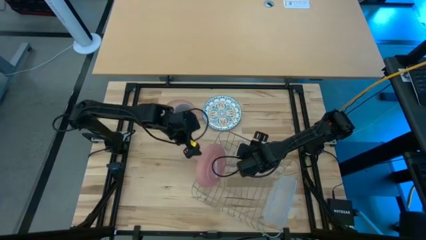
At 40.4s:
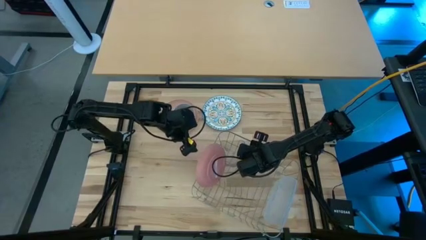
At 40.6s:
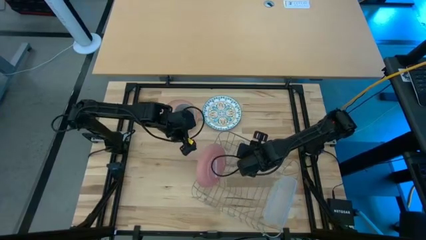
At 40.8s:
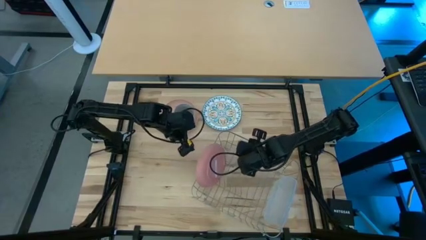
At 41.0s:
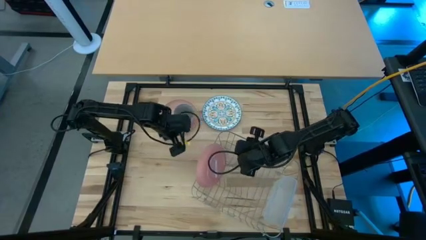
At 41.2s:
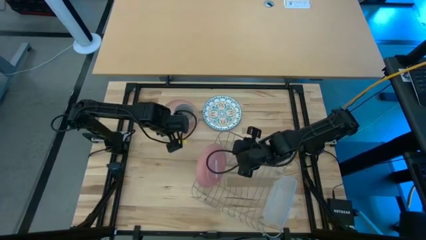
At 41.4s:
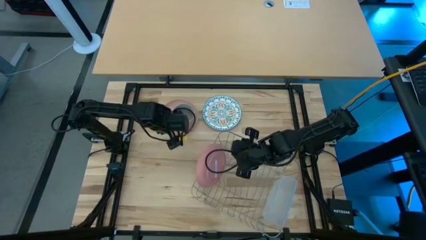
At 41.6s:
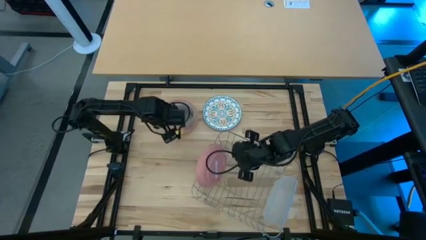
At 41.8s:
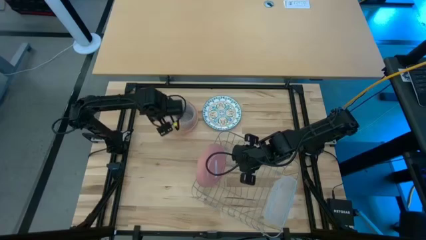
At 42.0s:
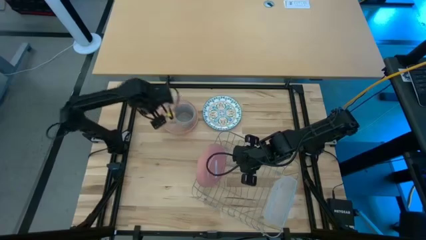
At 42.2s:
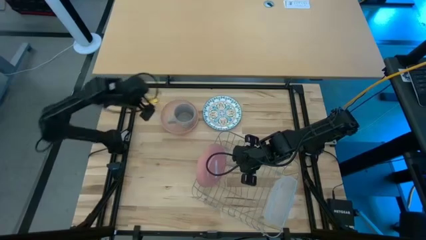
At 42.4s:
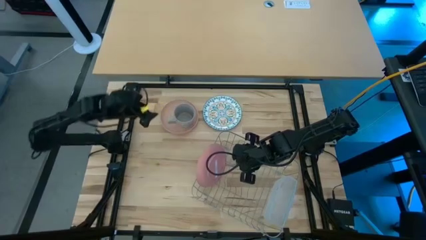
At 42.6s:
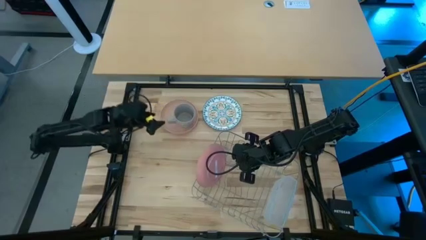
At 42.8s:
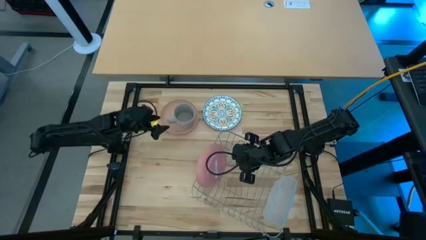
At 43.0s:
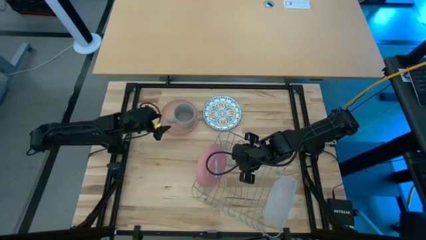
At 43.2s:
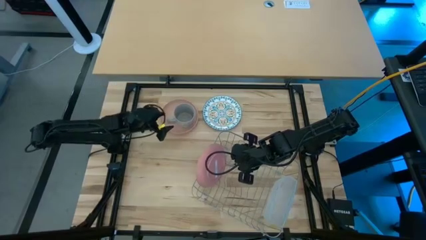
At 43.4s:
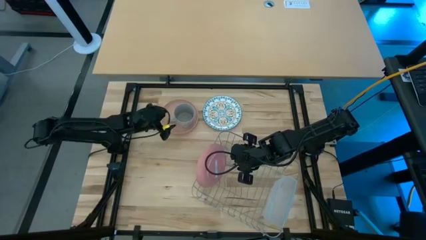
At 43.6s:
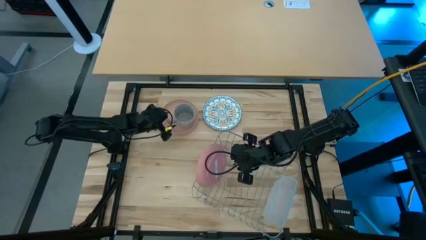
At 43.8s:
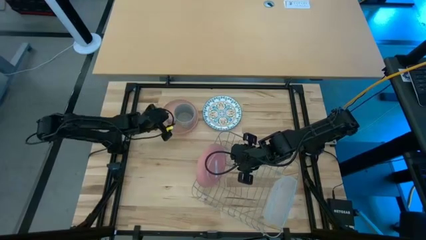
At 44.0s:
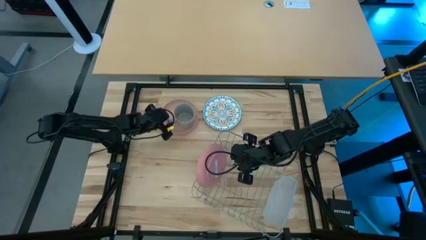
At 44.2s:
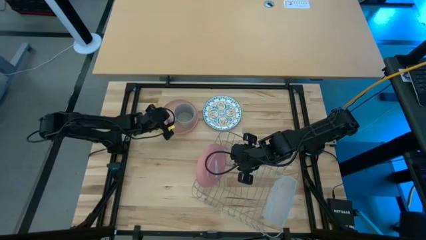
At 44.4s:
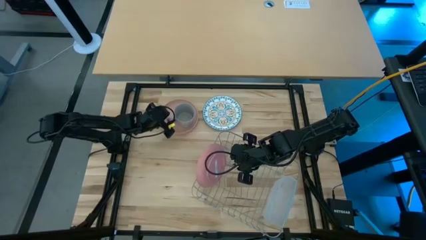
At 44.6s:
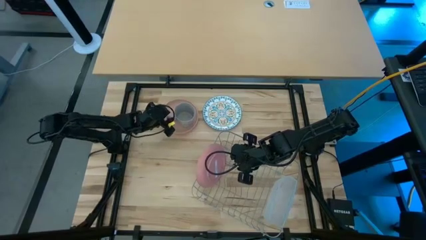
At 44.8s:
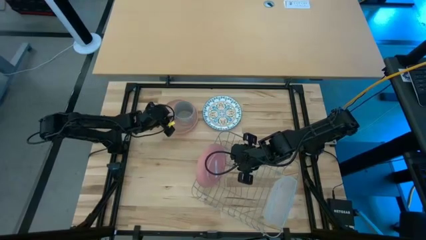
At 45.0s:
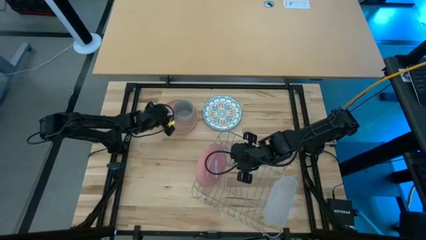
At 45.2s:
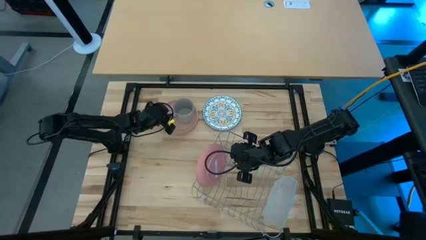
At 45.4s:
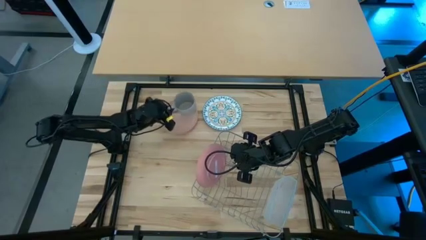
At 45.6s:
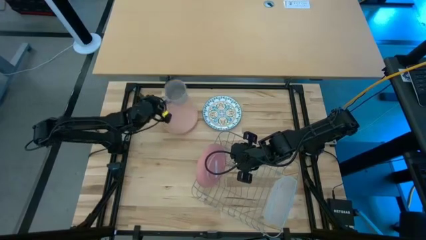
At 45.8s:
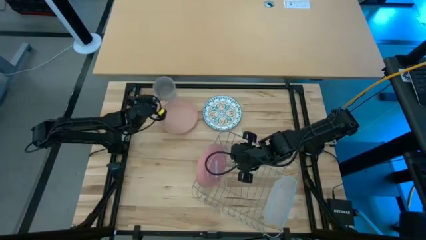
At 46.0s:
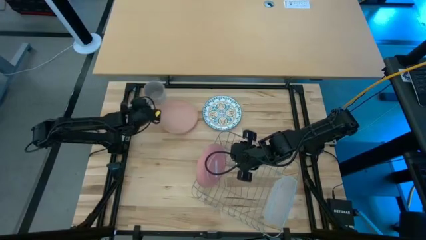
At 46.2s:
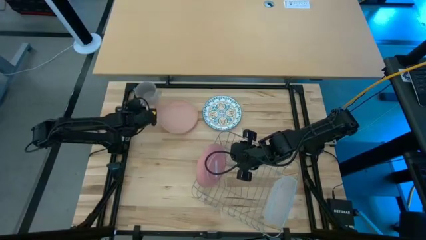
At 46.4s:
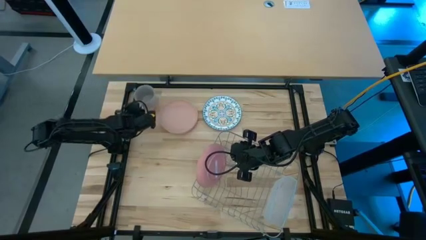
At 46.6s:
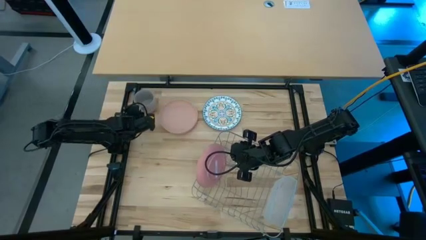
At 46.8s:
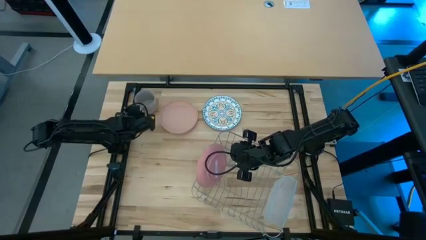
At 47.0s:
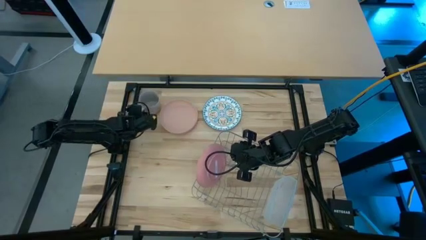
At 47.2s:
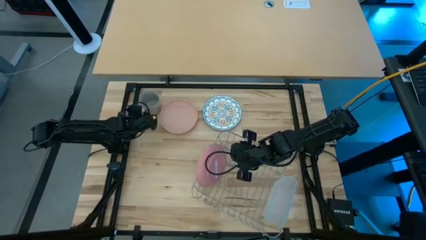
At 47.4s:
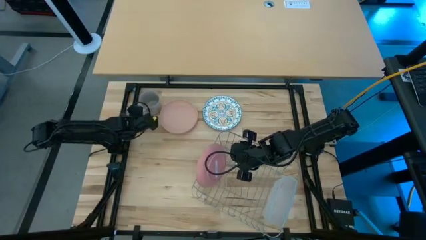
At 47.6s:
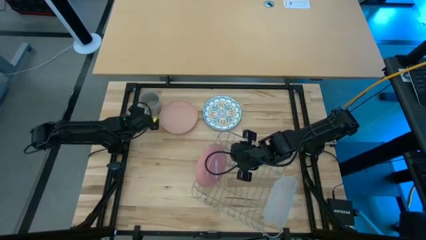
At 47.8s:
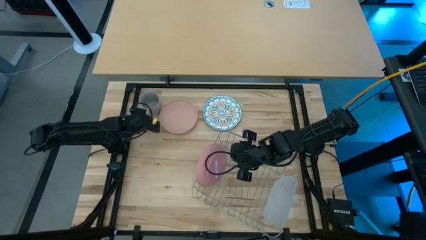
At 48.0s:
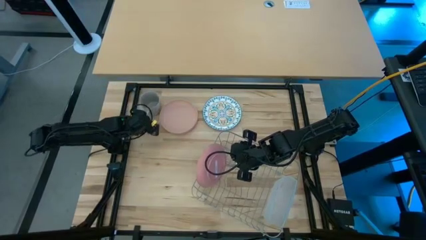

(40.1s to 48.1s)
Task: Sort dishes
Move the gray mug to the top left of the table

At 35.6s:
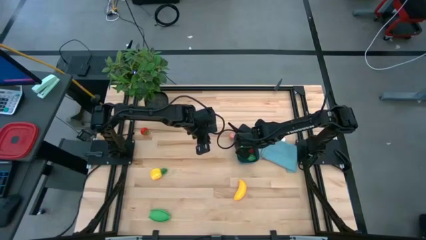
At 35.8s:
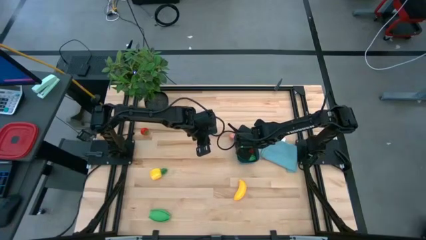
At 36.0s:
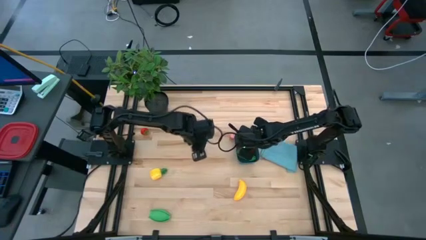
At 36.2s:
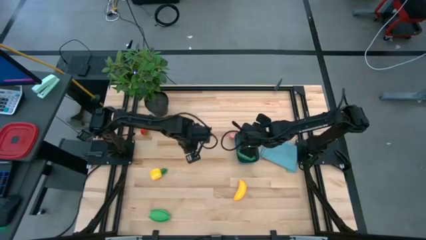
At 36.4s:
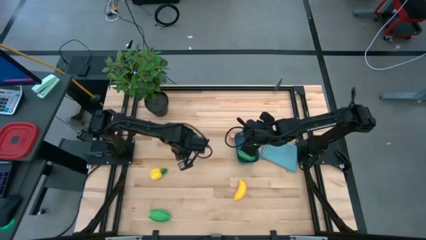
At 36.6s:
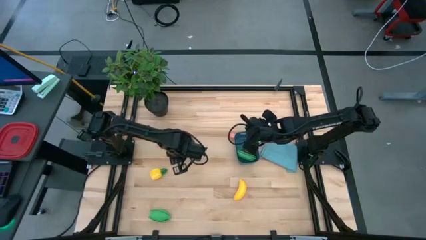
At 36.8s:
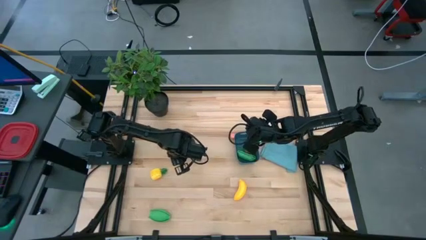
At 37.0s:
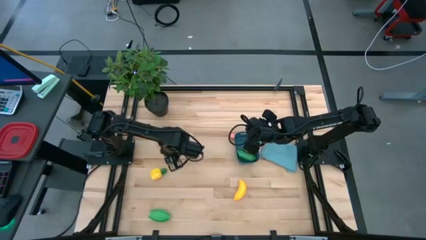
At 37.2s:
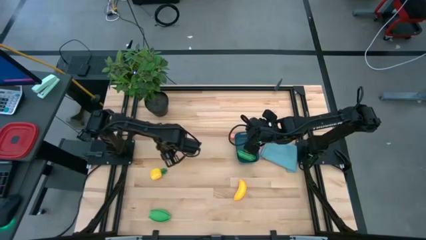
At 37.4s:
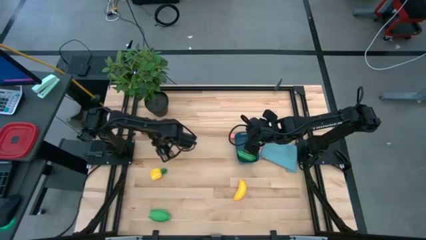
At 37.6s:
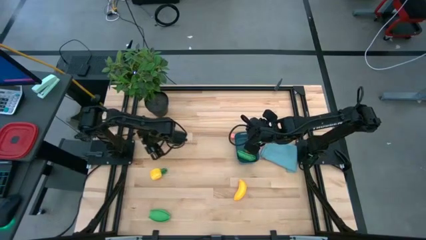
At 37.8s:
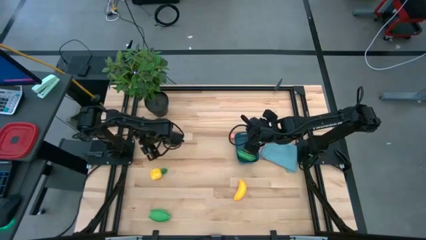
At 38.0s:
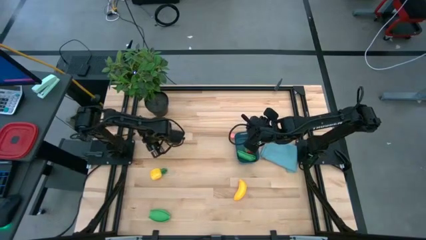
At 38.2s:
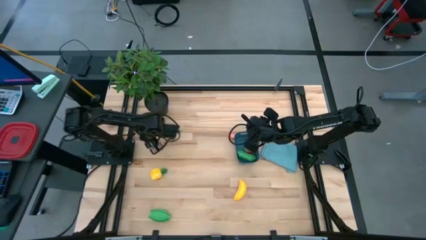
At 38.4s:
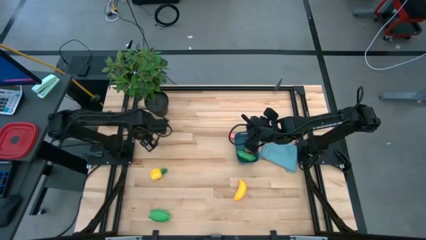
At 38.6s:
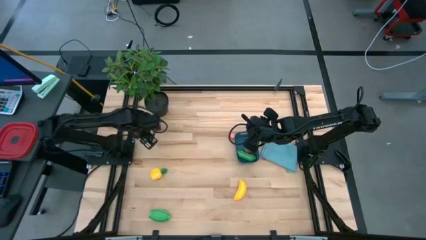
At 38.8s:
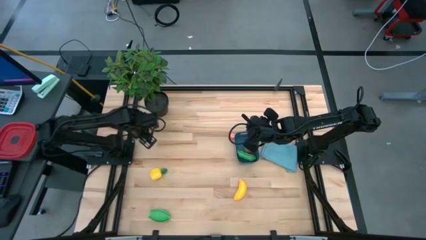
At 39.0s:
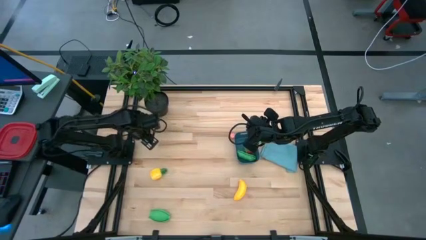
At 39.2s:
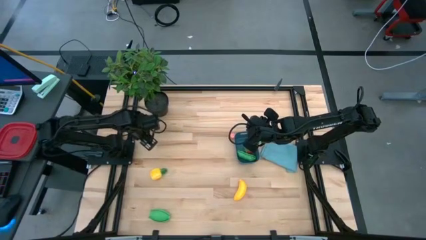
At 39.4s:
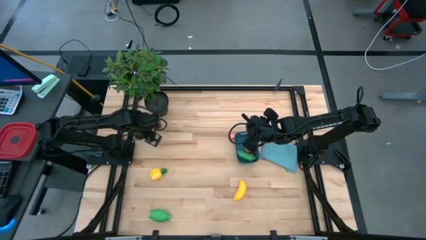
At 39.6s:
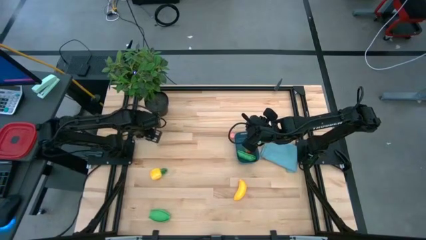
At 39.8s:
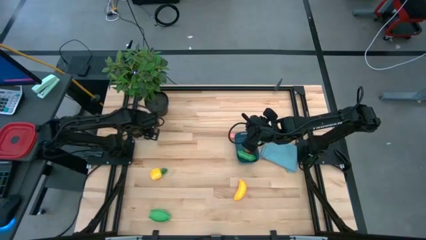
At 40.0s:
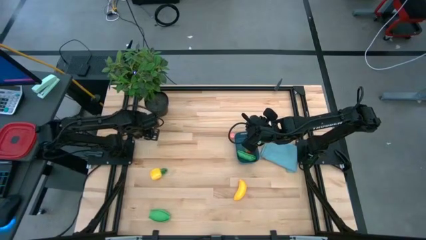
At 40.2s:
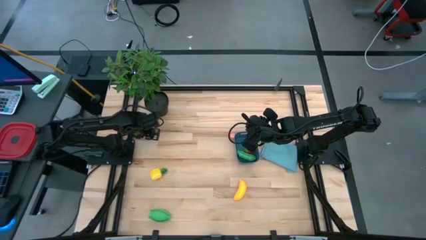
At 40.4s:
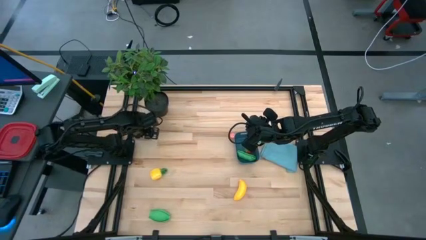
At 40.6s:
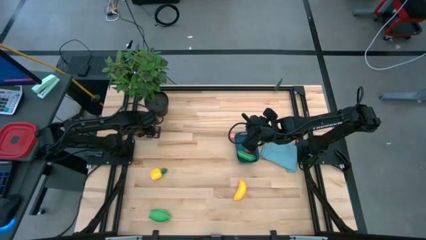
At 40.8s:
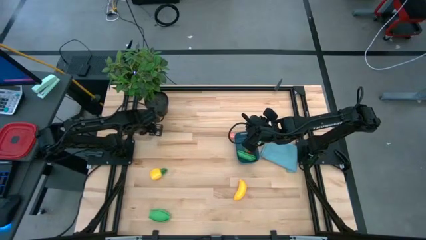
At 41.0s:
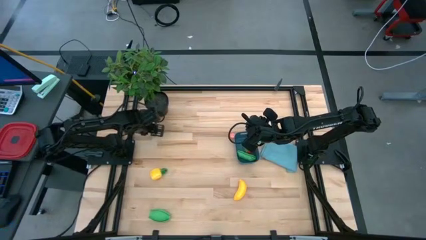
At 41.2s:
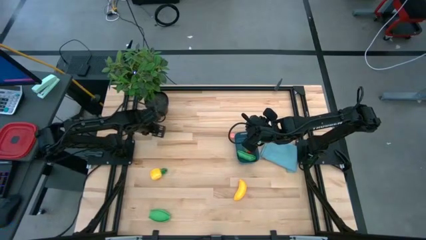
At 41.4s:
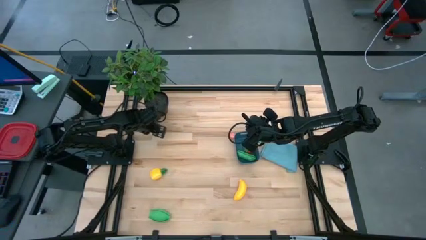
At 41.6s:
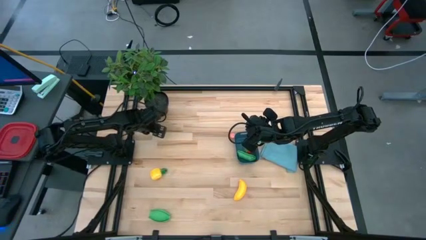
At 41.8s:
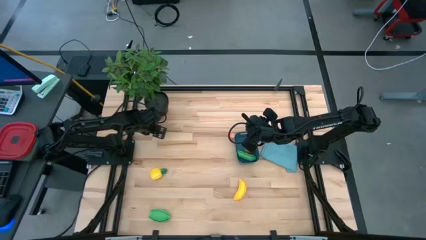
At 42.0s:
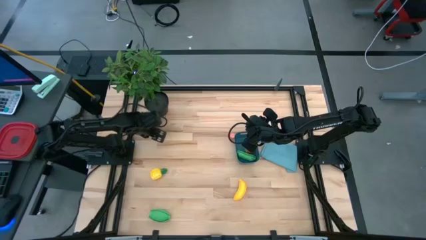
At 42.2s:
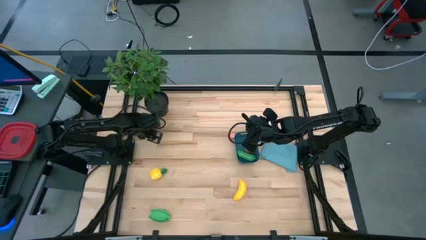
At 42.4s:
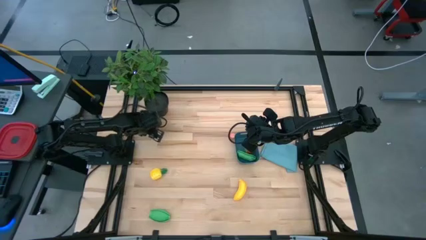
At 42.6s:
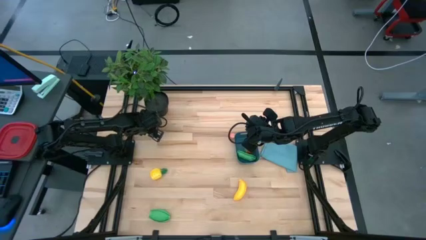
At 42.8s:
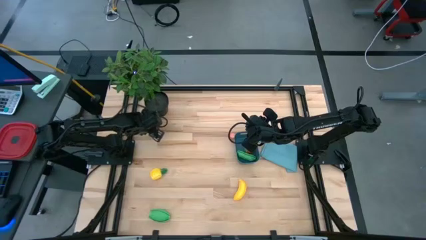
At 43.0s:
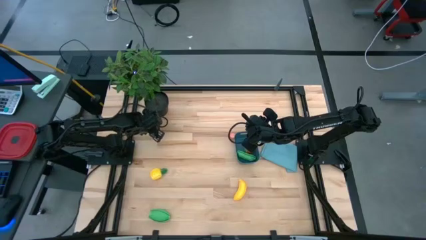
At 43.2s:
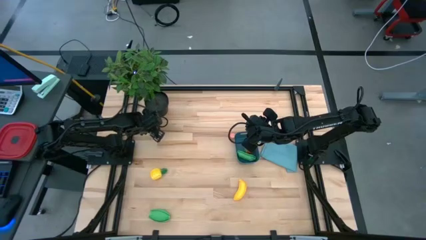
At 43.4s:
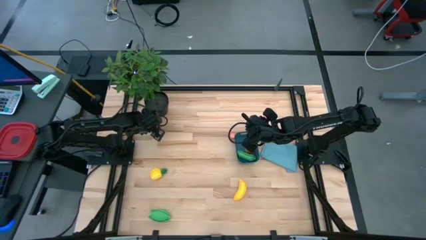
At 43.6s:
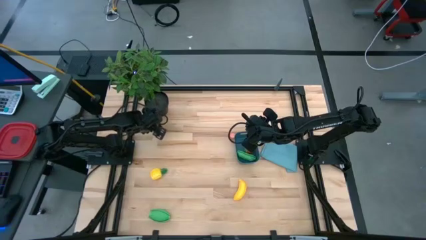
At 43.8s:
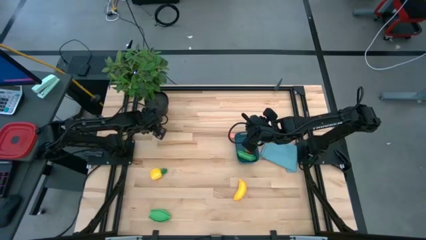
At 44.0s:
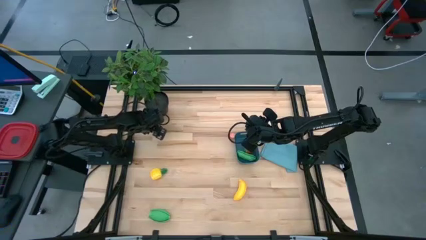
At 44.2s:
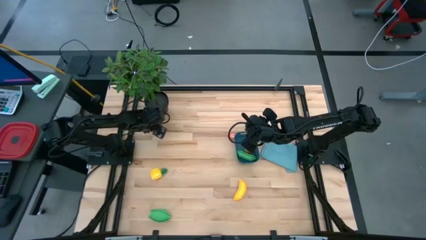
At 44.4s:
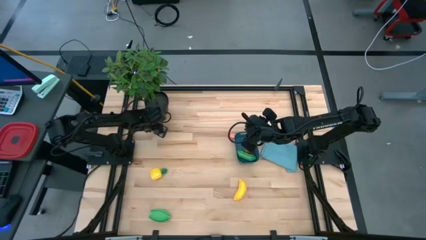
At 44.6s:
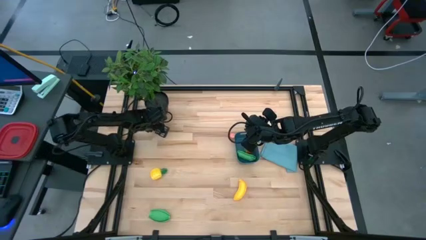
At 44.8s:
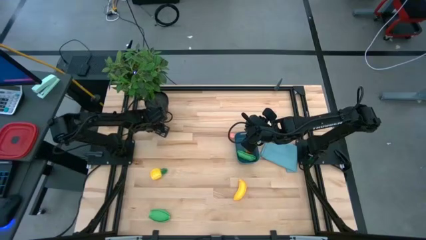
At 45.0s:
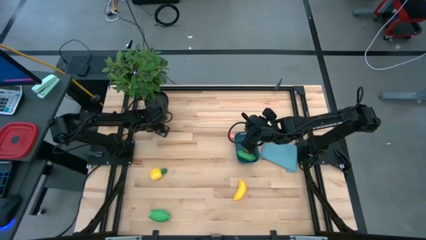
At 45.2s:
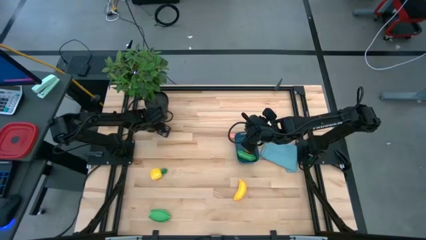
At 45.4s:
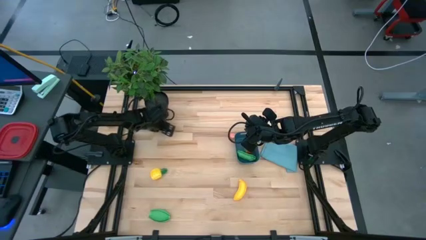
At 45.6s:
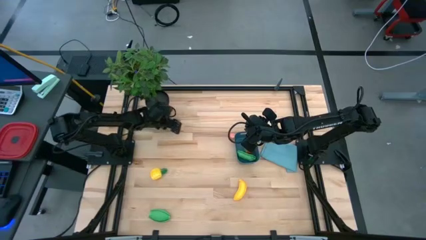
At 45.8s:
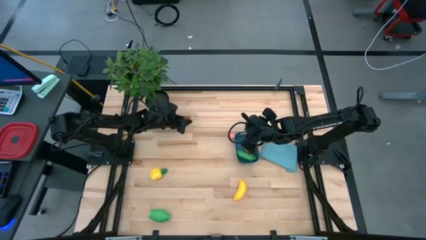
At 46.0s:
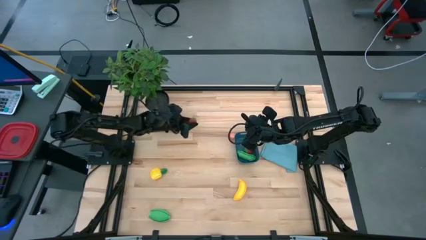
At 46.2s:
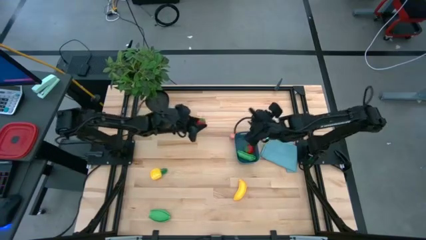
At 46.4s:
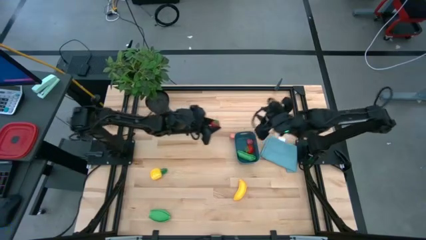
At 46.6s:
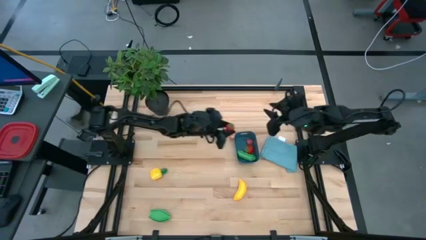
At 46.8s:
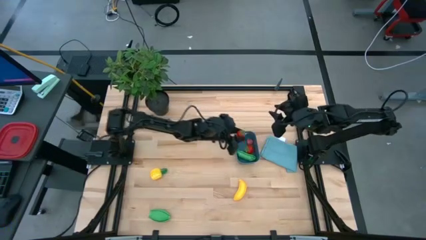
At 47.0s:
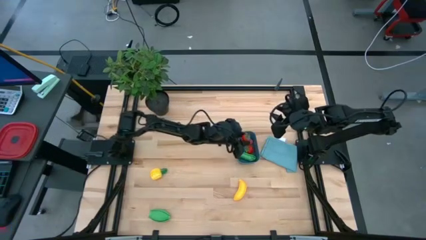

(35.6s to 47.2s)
Task: Pick and placing Produce into tupperware
Put the red strawberry into the blue bin
